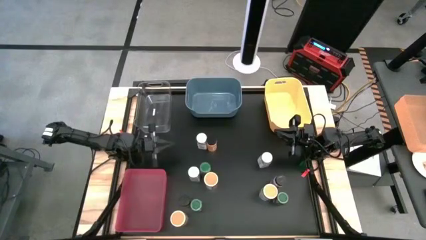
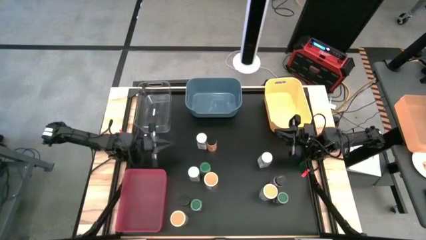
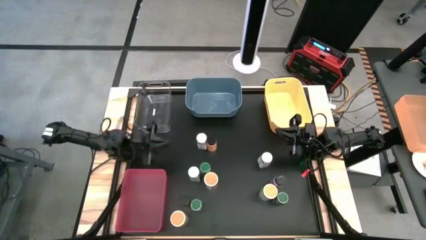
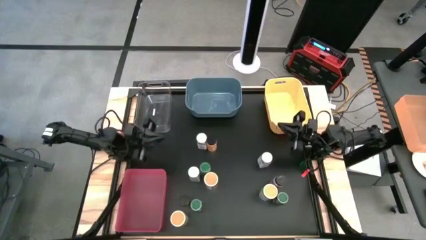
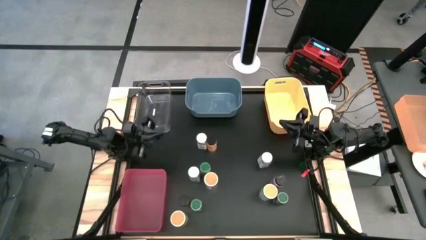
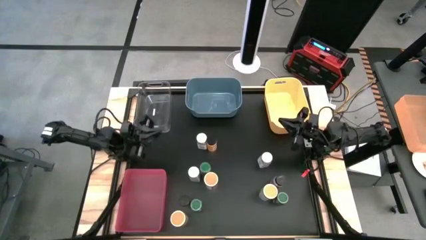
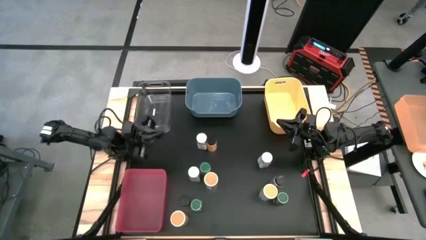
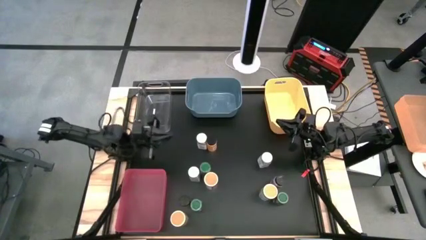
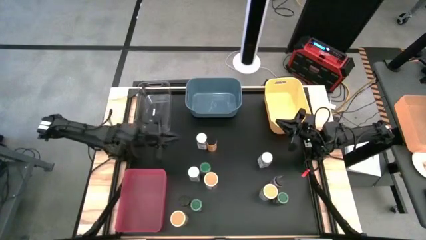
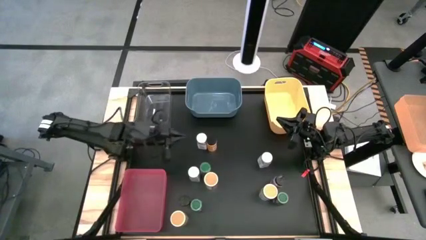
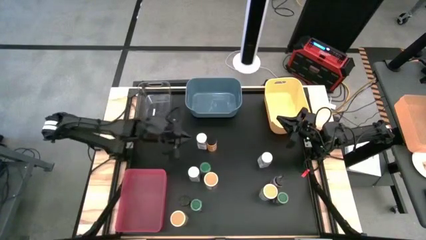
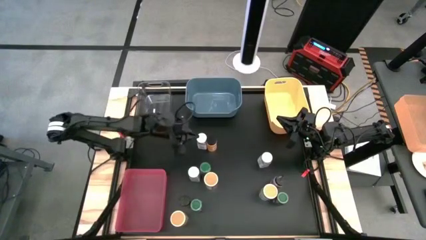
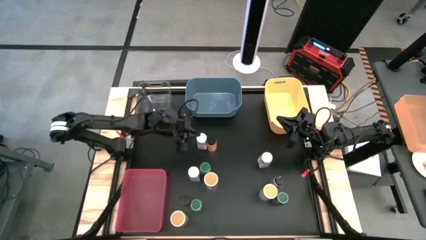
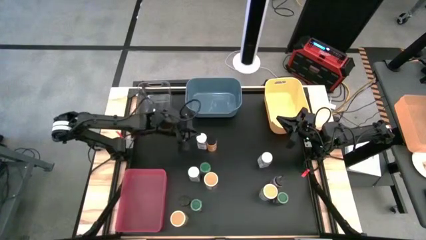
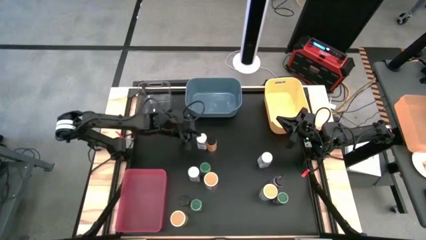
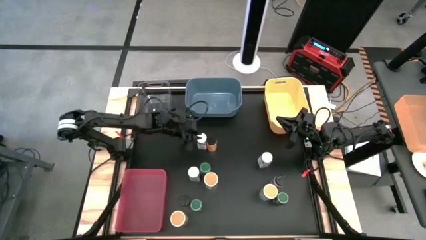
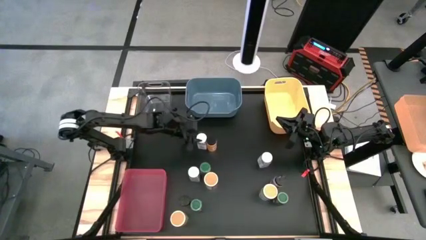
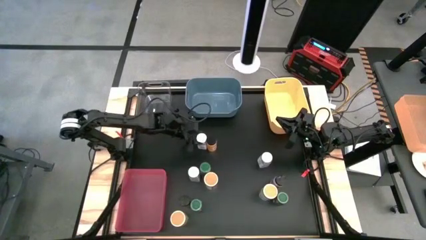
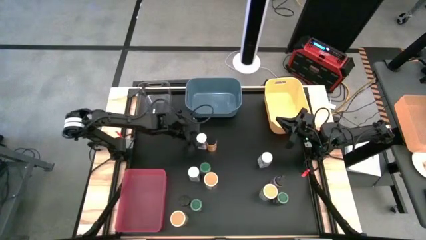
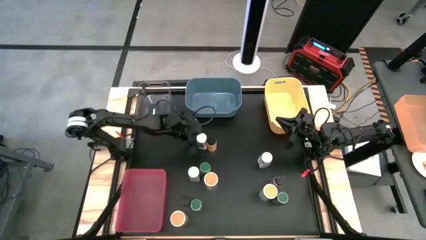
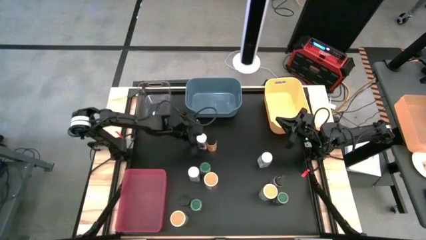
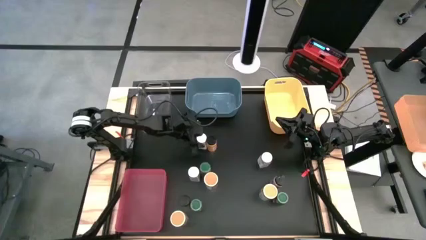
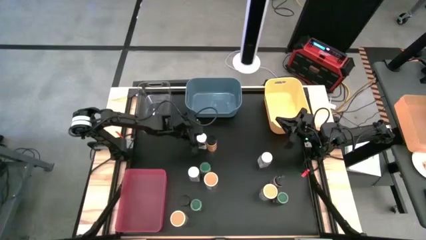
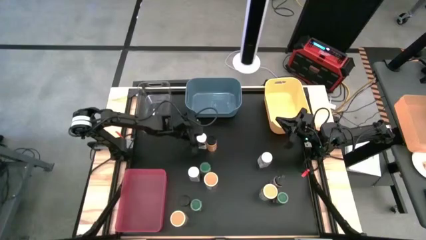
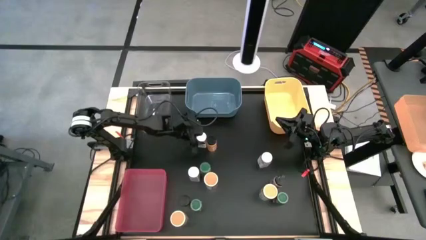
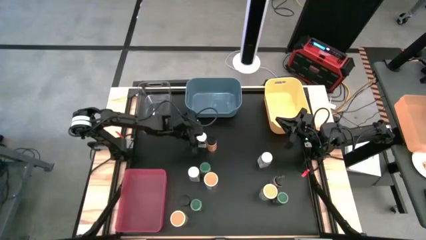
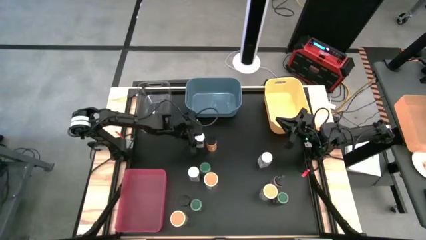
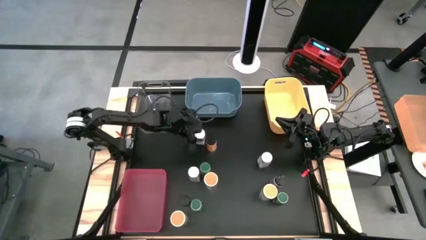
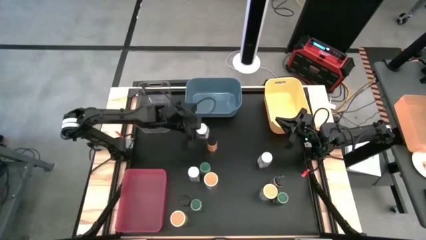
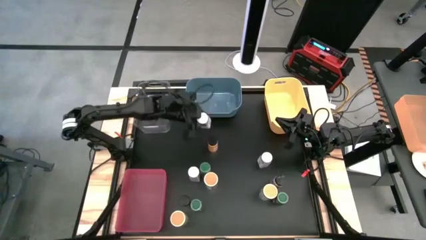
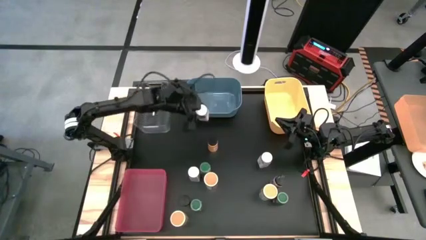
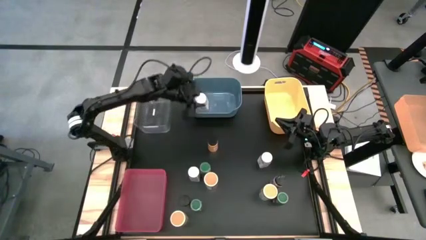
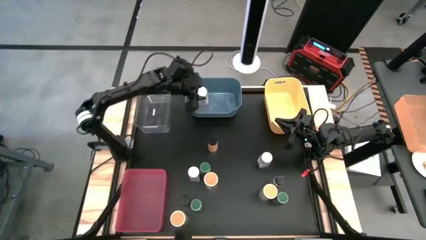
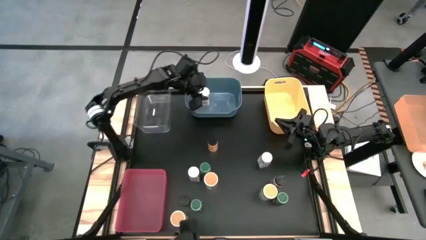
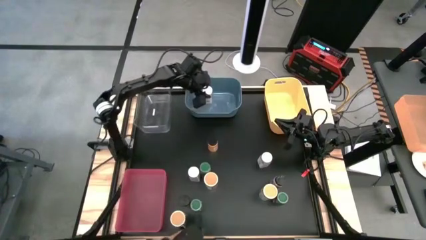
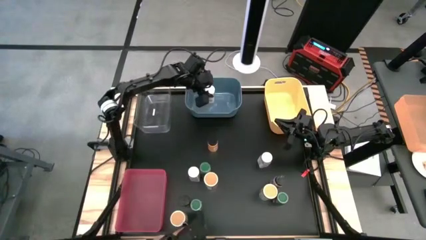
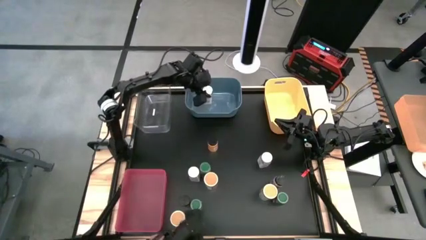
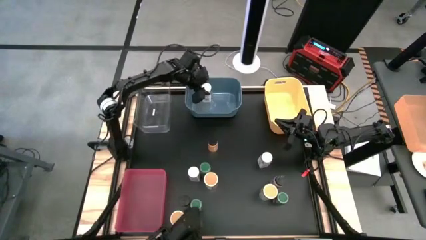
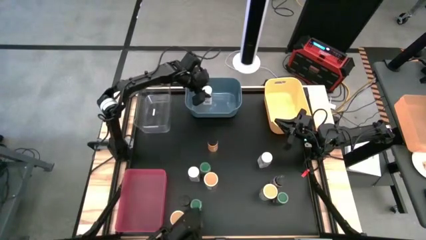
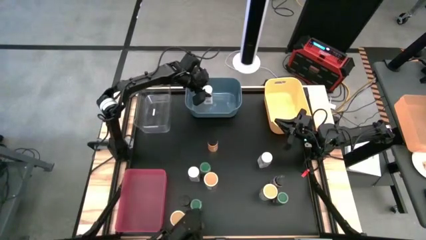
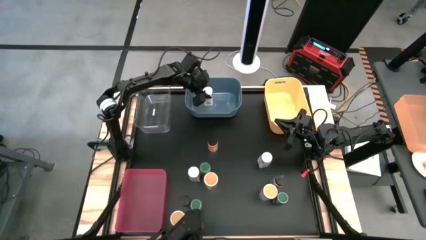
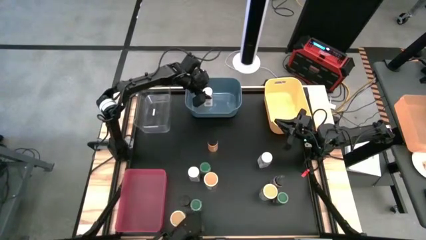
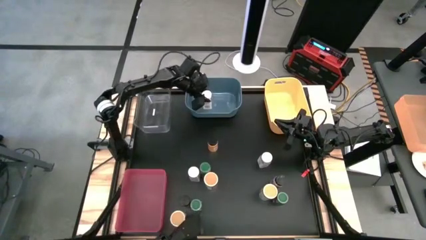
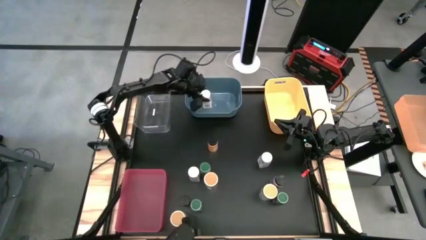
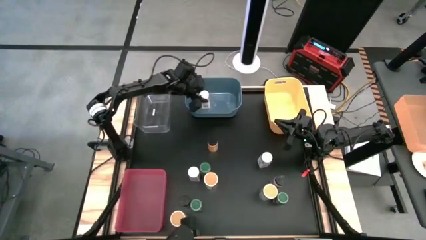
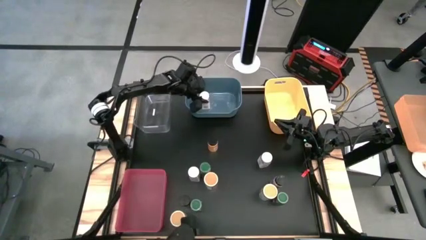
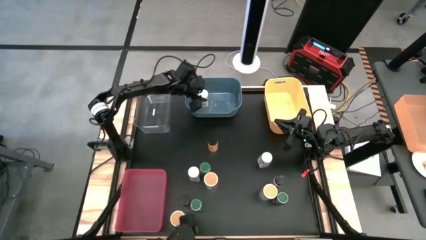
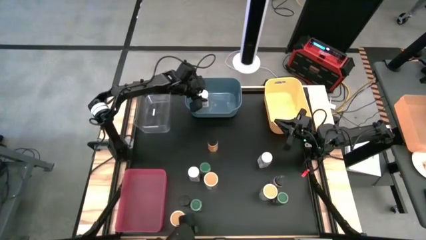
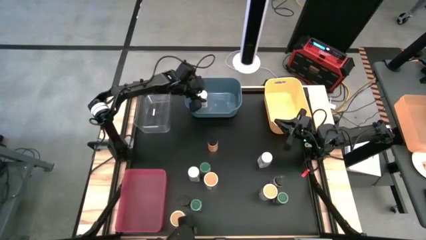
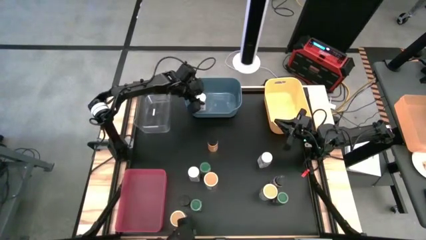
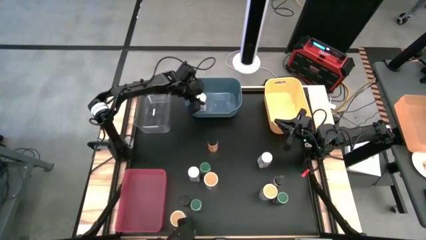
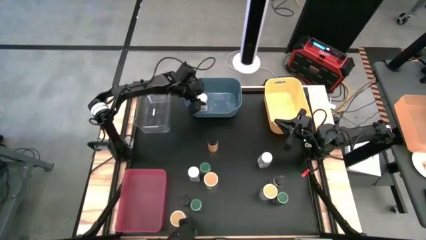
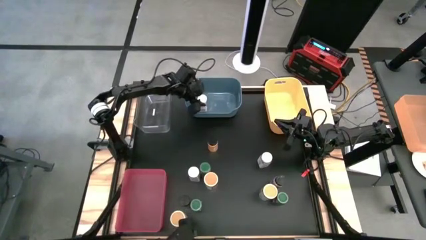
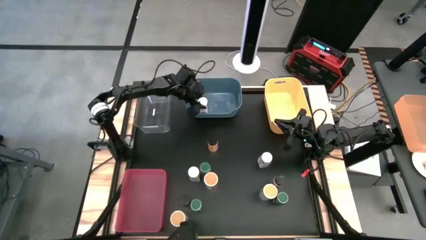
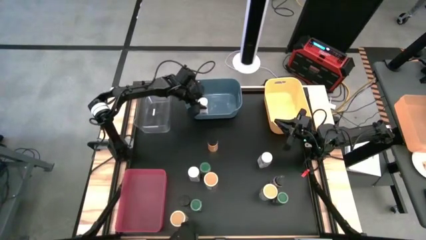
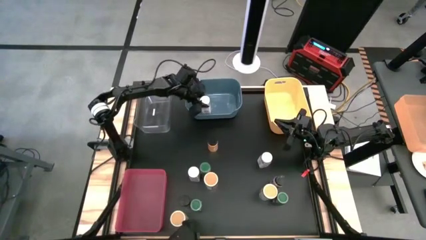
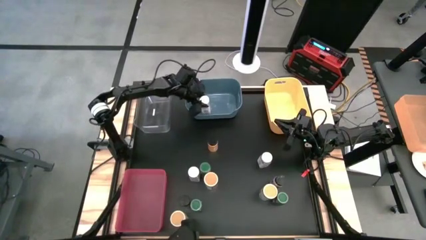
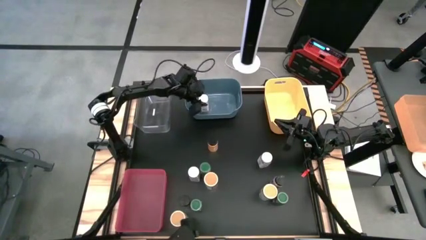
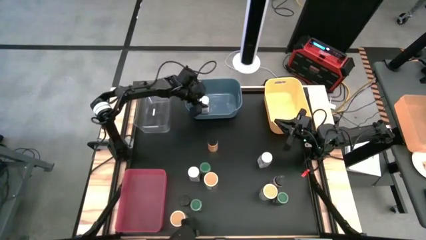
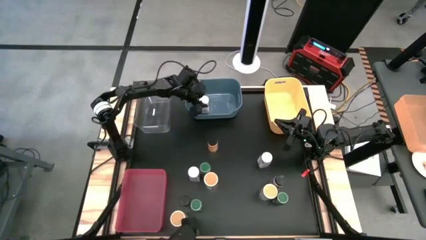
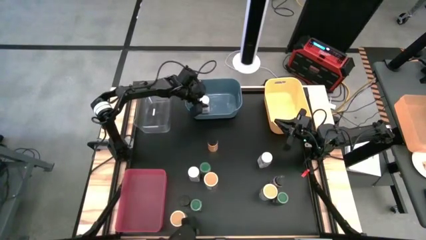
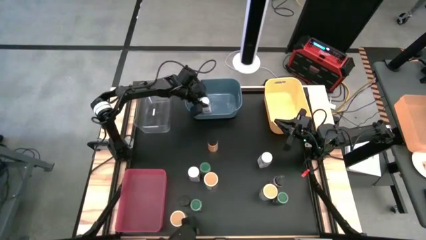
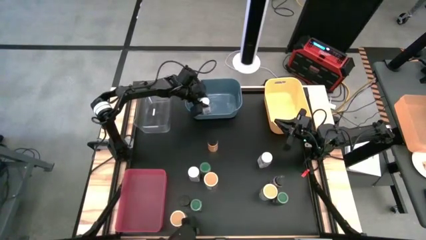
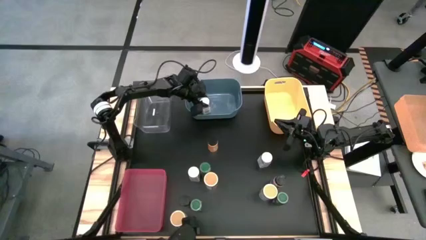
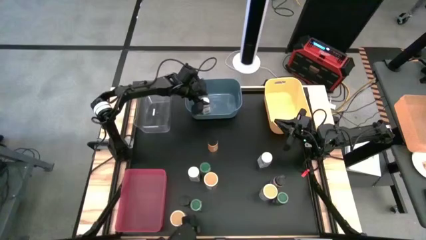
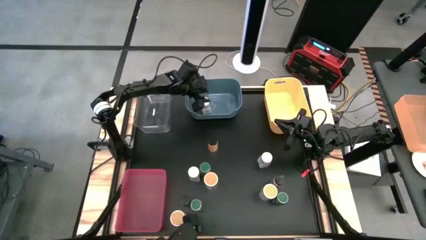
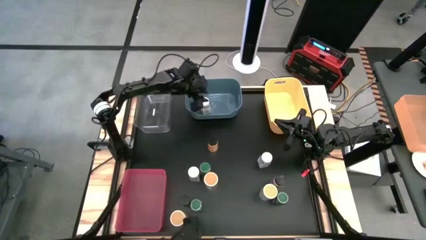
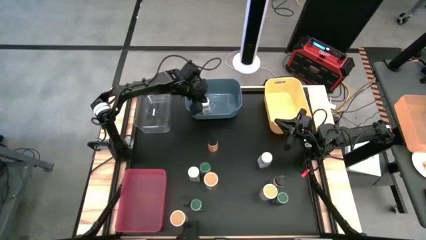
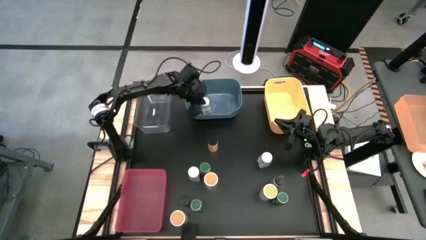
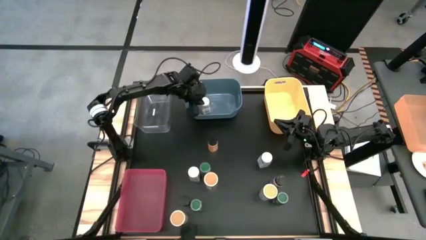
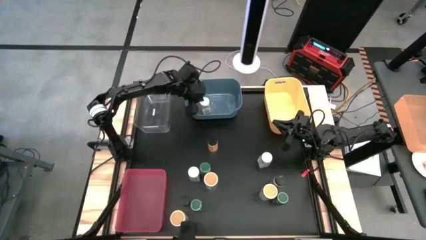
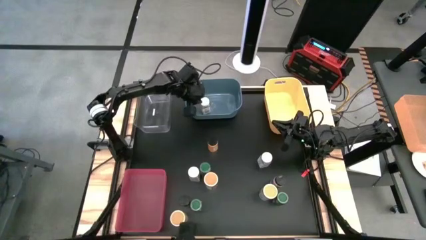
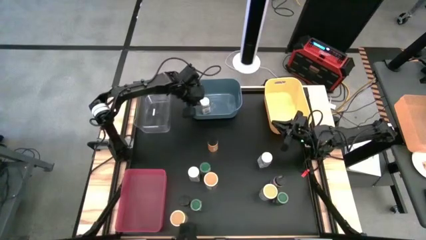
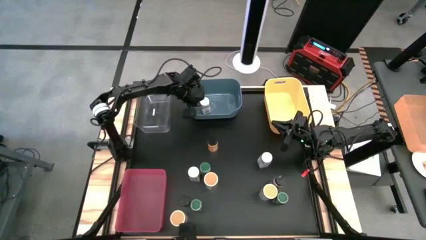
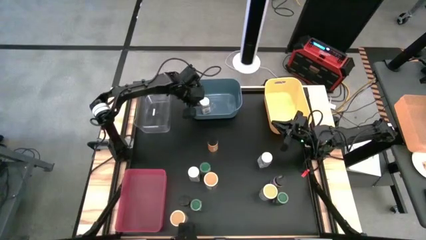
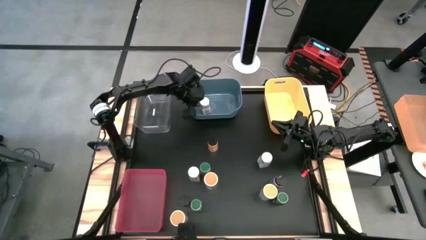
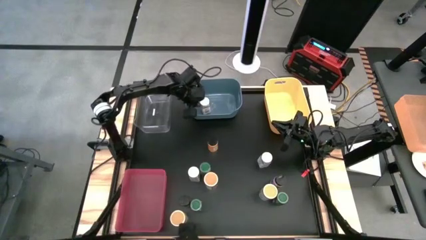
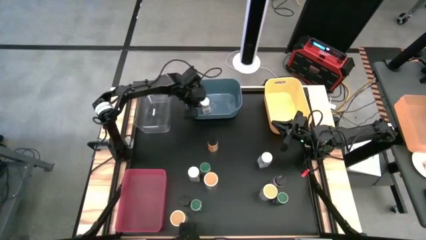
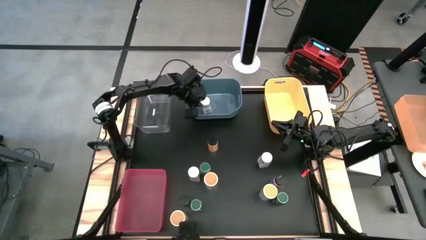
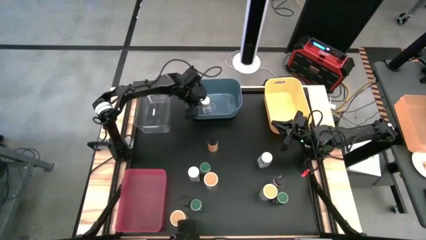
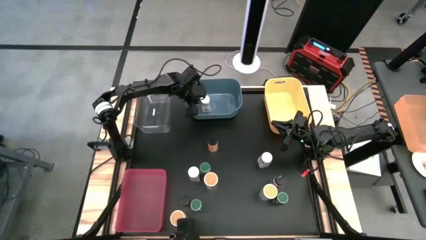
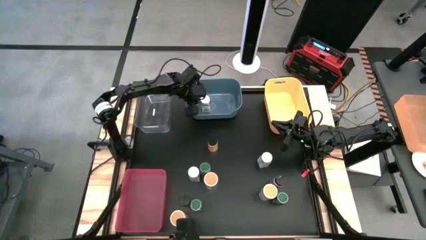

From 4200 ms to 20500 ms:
Task: Sort spices by type
Put the top white seasoning bottle into the blue bin
